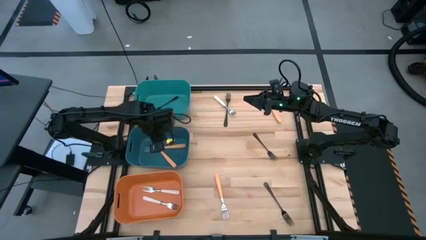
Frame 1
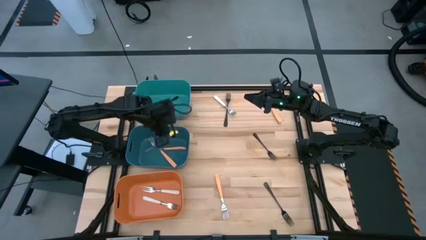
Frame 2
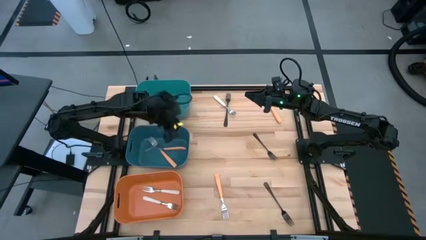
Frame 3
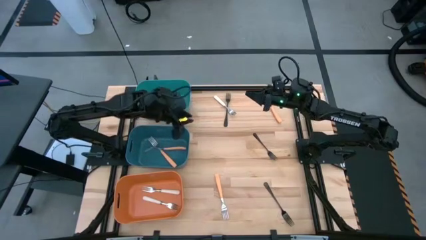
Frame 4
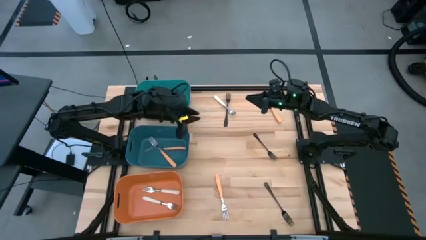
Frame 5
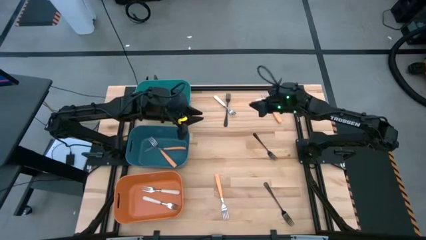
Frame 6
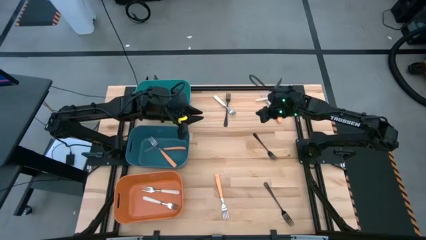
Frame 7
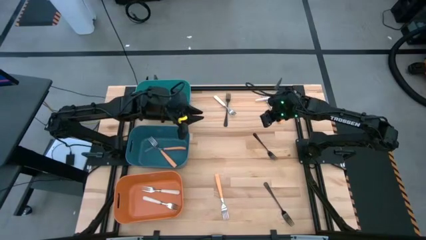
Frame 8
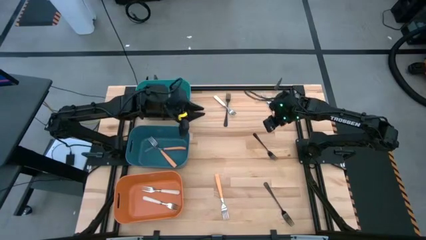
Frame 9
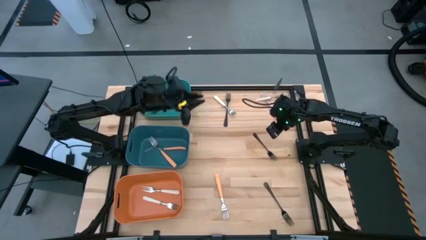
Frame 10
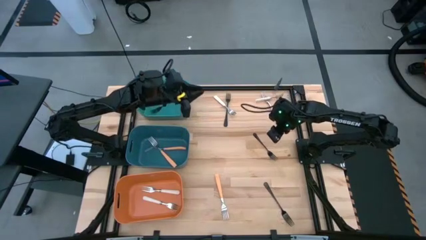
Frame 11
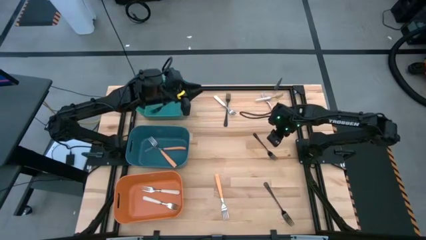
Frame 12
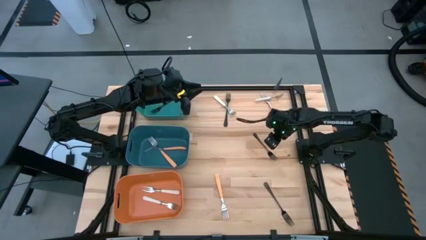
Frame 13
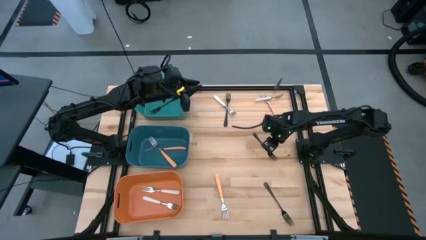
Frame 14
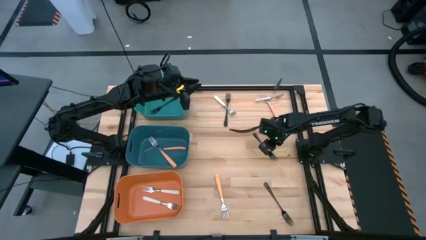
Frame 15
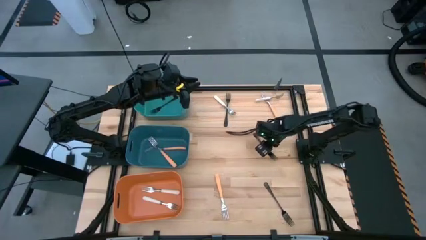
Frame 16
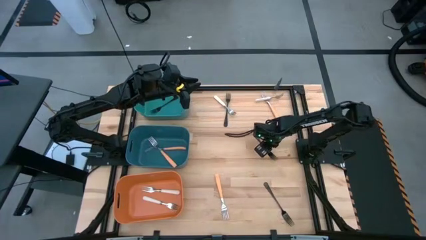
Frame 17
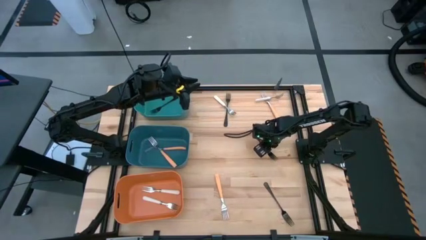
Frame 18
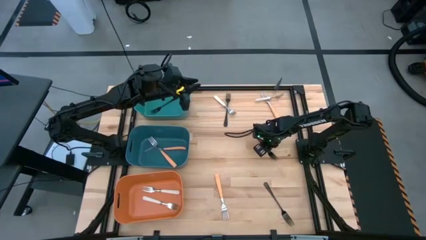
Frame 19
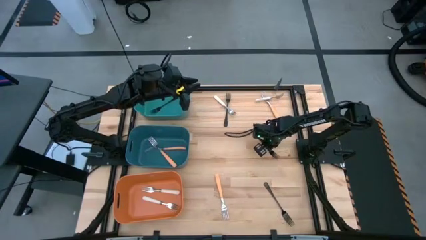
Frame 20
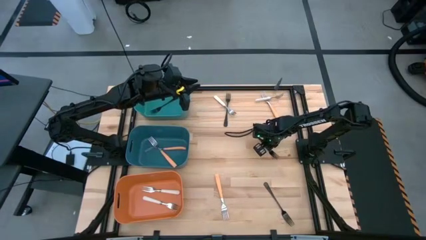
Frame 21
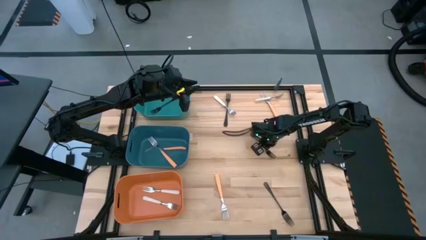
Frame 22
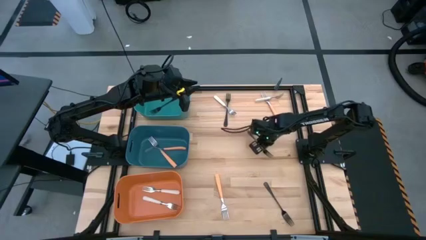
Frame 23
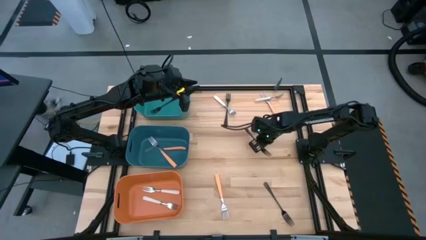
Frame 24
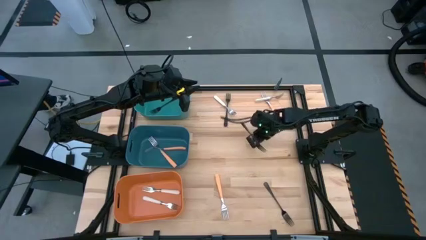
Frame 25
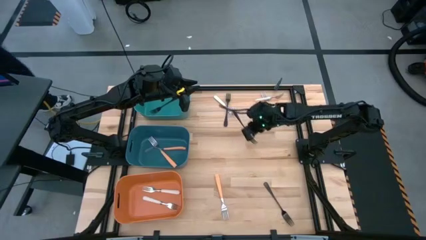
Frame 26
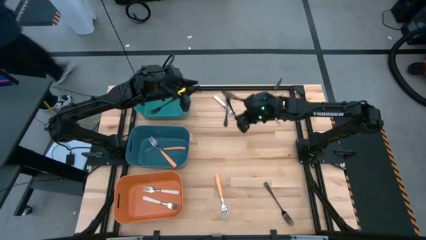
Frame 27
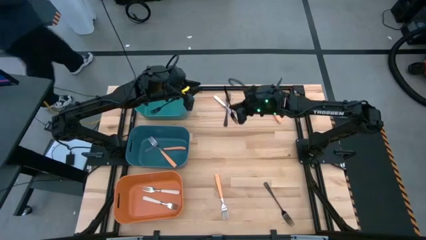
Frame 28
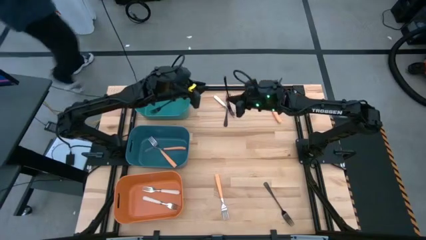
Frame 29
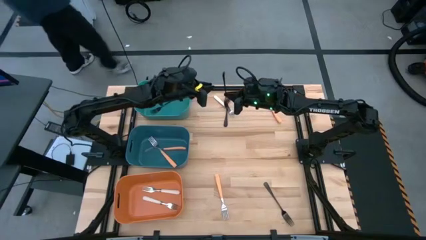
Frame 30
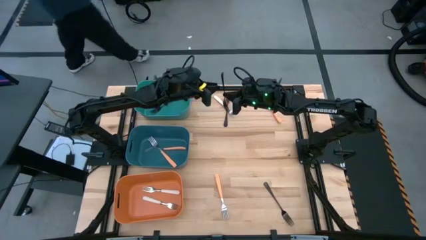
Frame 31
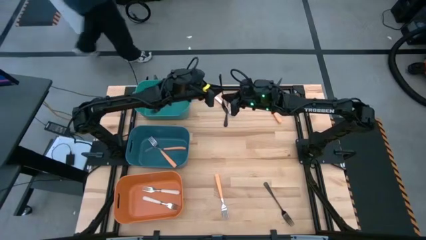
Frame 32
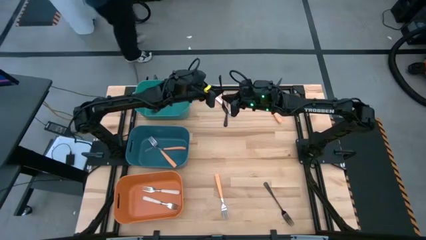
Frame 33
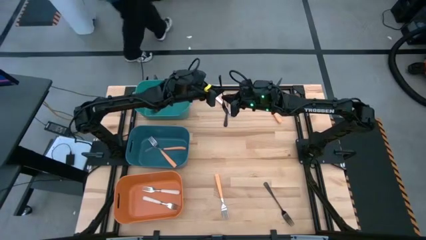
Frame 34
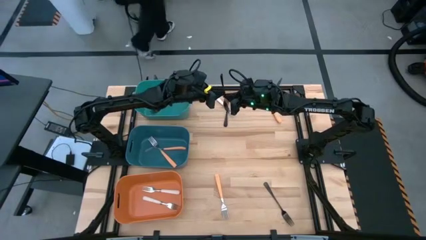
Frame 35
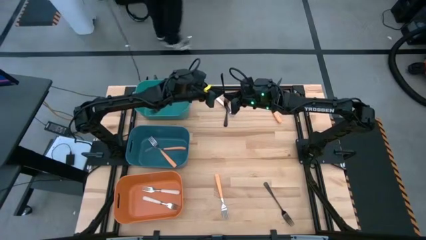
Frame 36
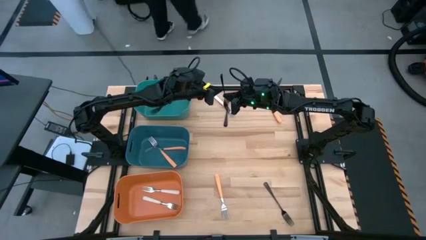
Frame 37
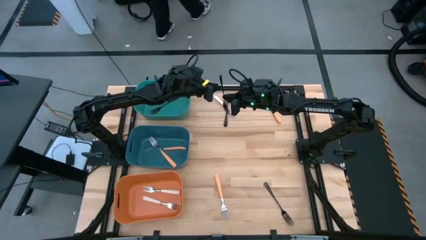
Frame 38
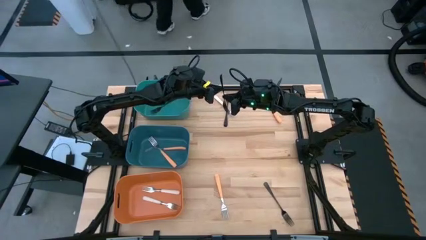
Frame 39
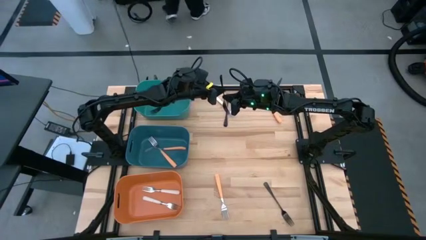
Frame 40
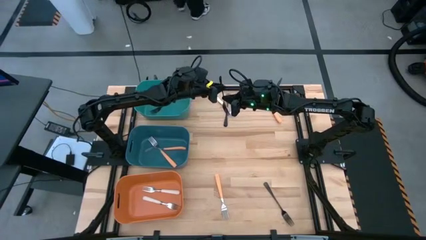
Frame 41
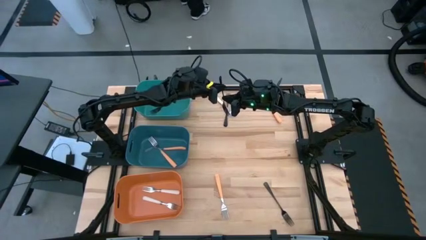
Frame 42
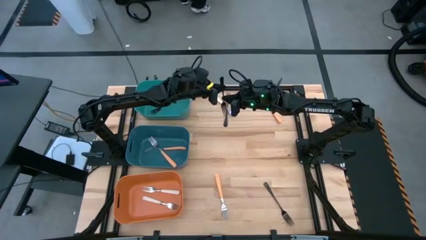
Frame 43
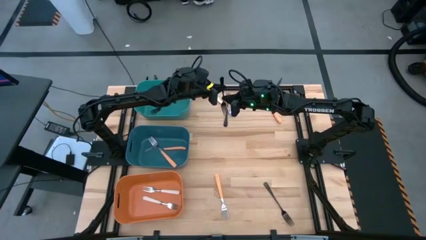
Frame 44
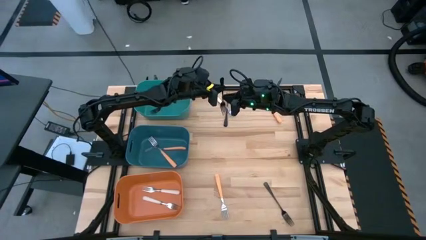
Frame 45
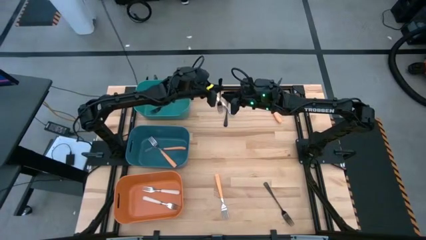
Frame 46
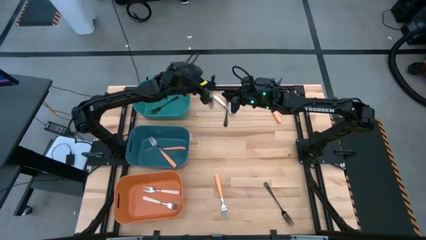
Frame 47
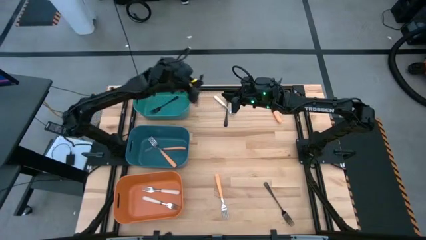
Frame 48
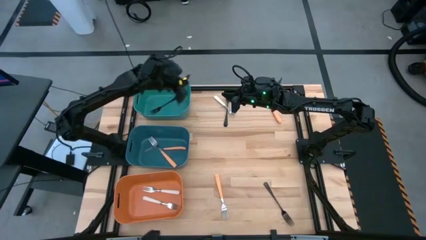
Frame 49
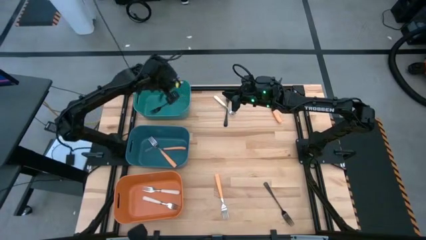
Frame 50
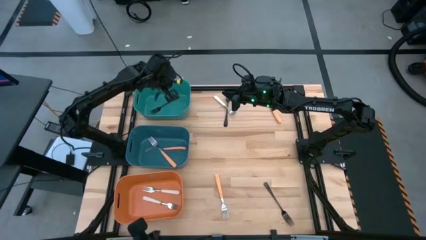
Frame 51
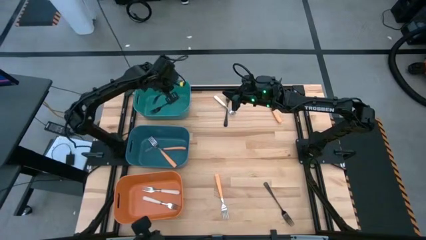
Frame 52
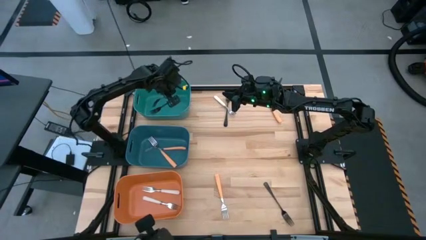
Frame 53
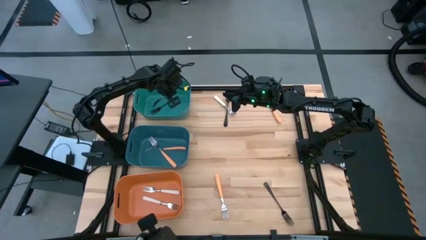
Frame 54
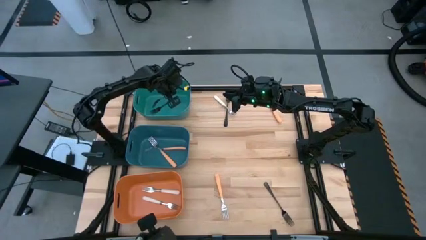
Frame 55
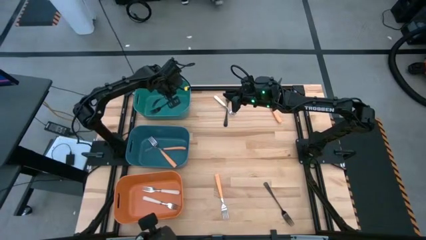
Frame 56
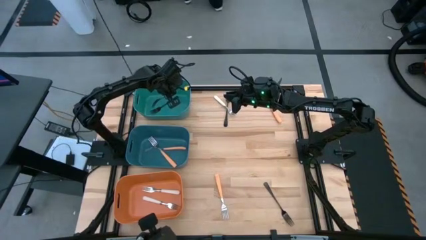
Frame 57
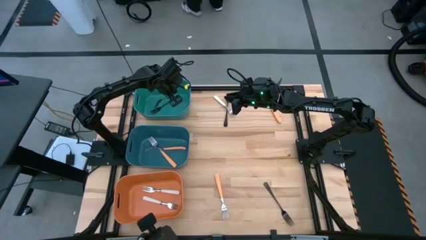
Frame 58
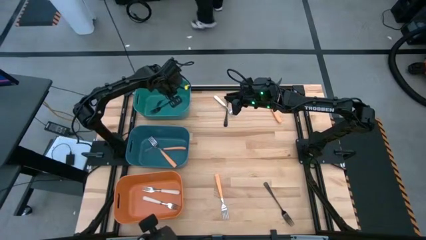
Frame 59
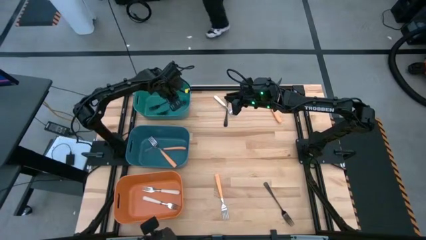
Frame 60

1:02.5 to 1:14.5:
Task: Sort silverware by color (type)
Put the black fork into the green bin
